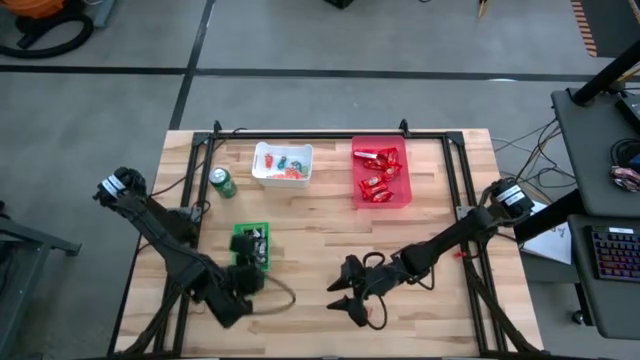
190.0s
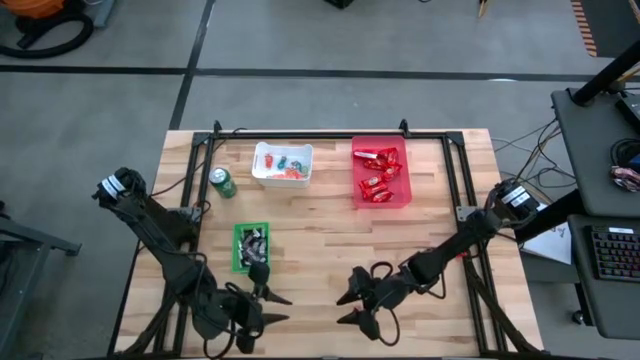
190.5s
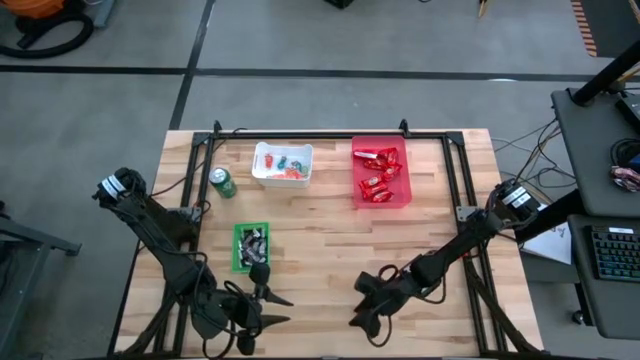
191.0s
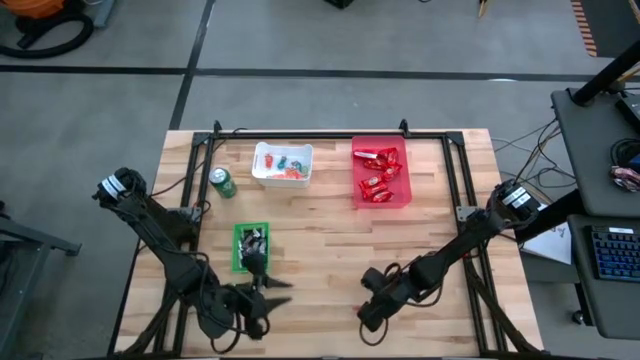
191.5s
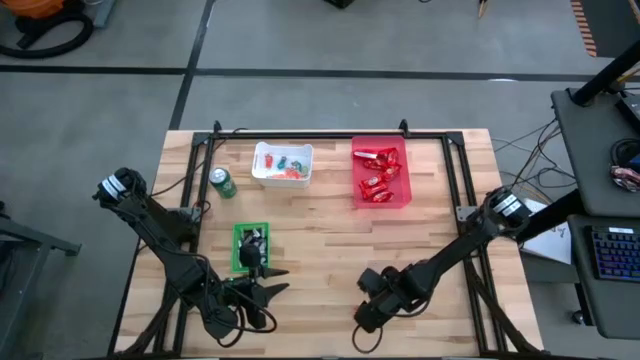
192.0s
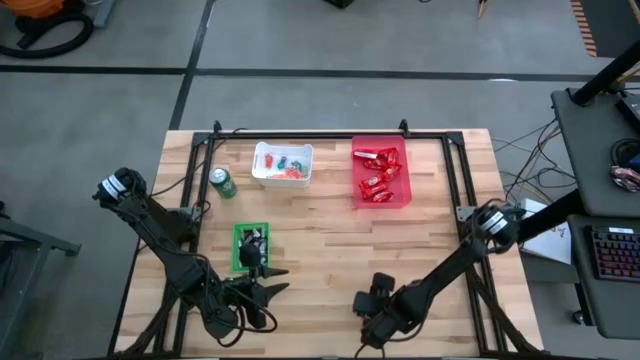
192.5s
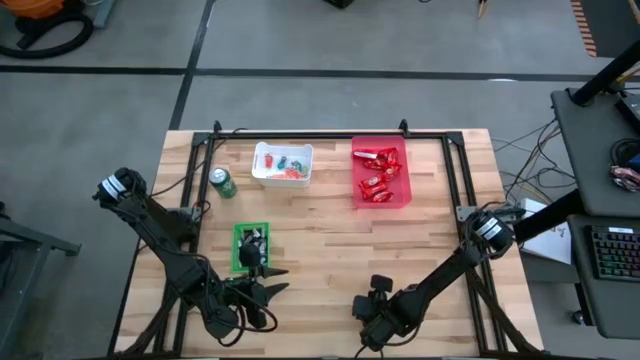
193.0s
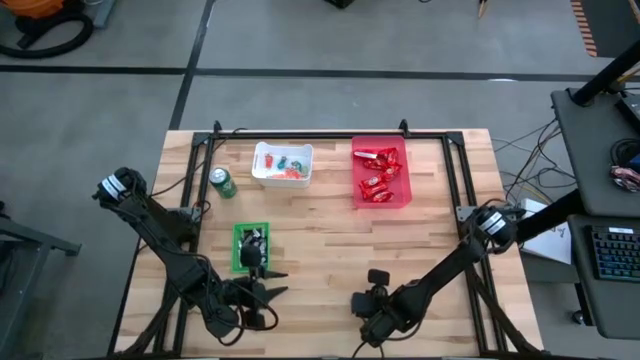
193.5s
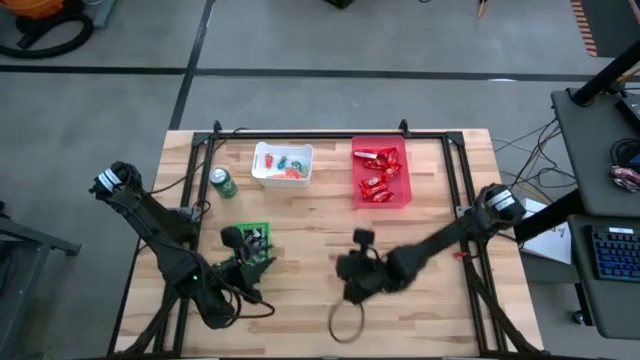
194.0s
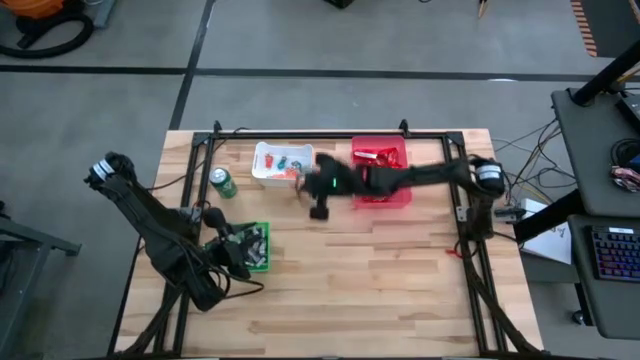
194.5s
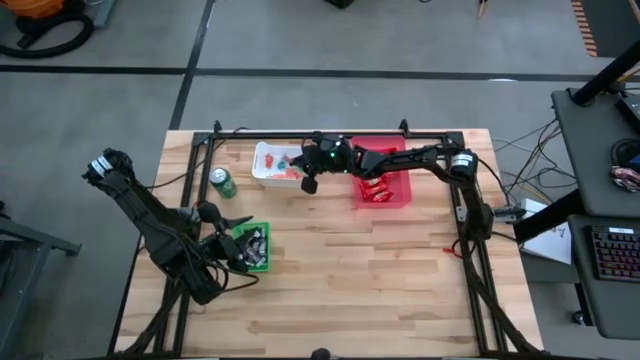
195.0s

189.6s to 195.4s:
Task: Organize candy in baskets
Put the orange gummy into the white bin

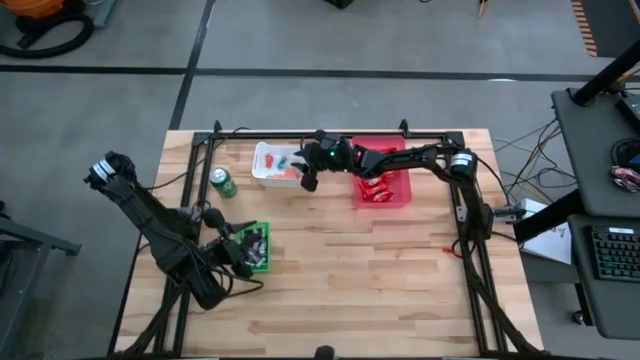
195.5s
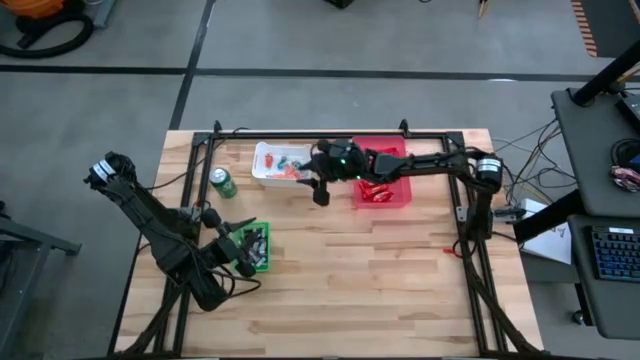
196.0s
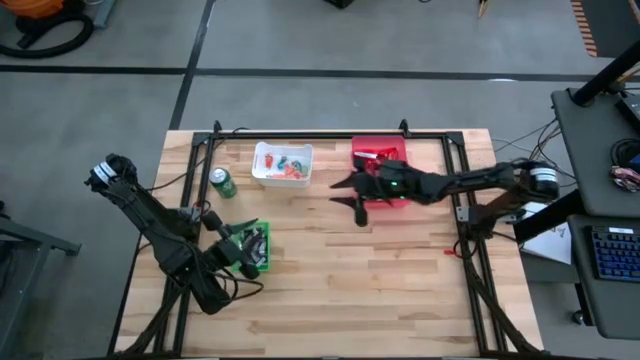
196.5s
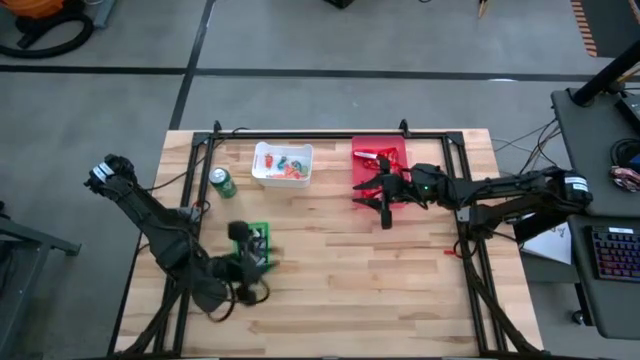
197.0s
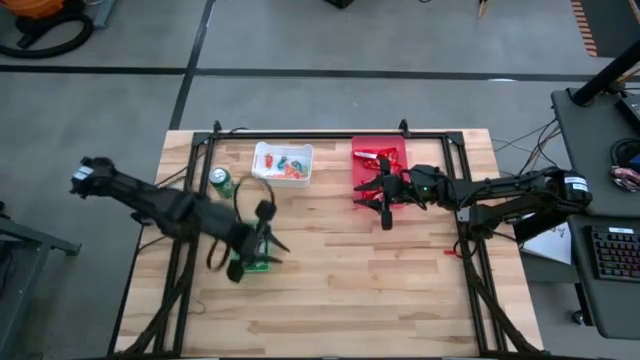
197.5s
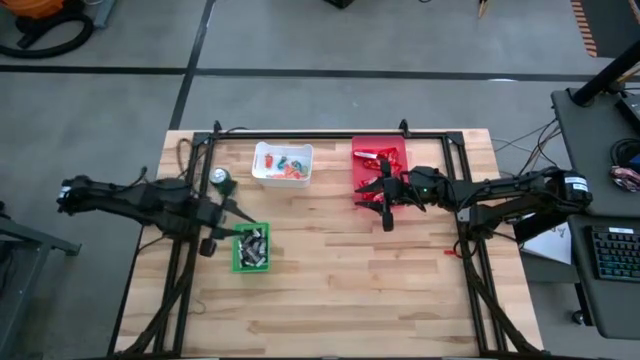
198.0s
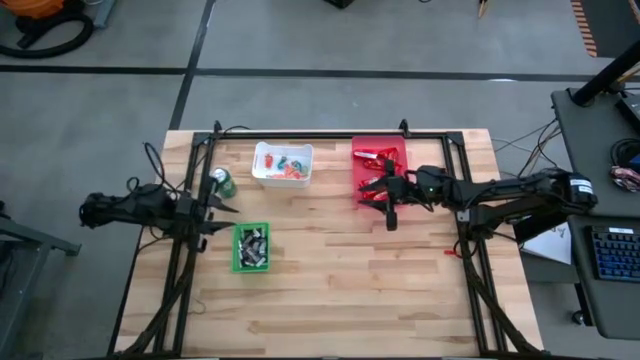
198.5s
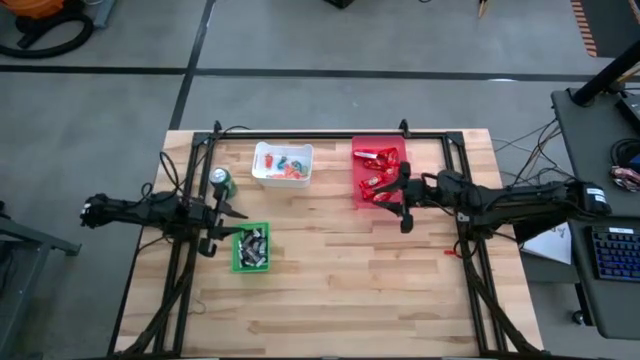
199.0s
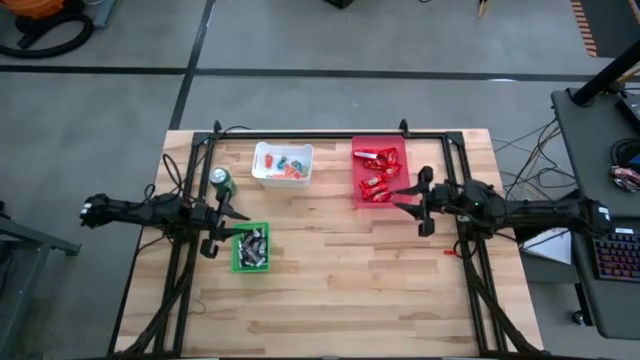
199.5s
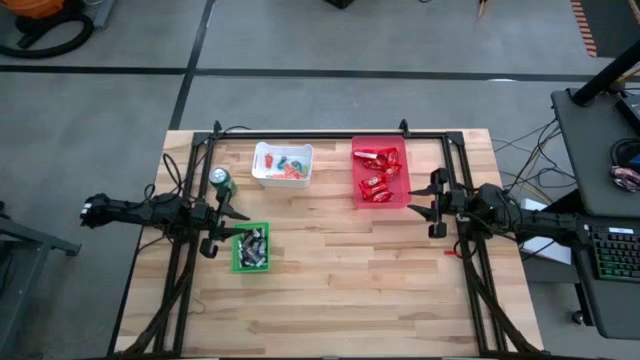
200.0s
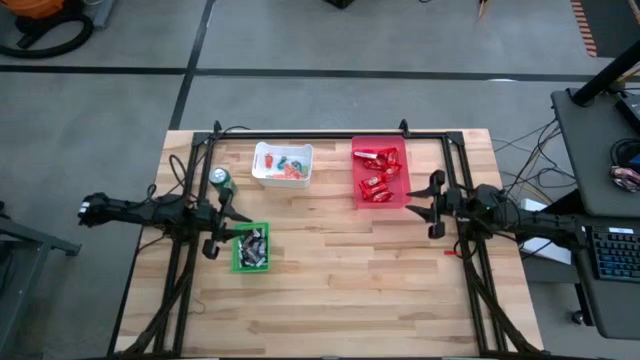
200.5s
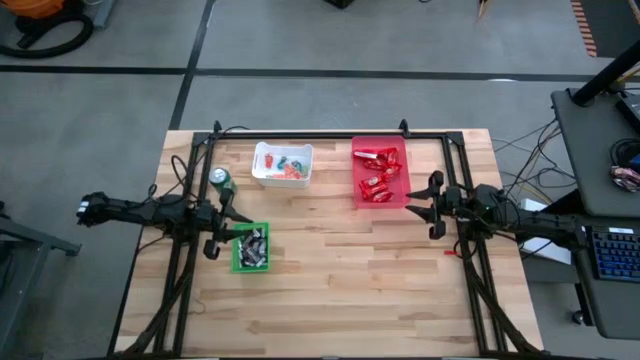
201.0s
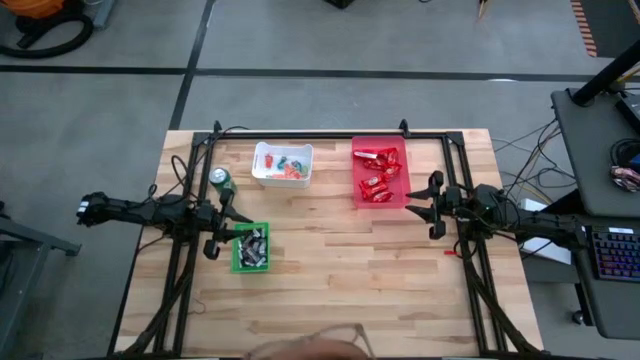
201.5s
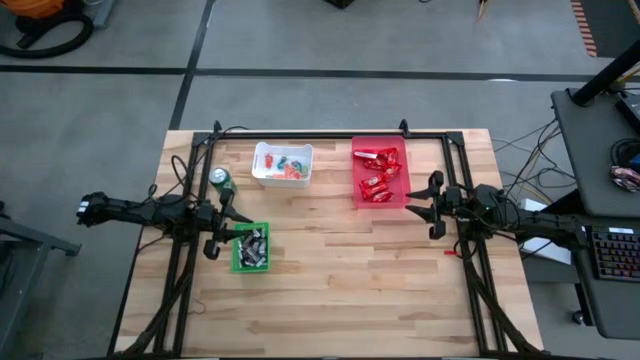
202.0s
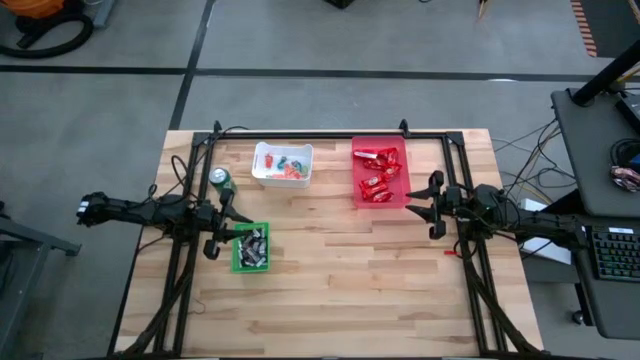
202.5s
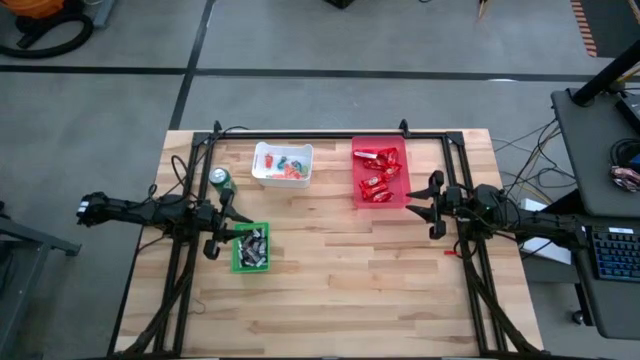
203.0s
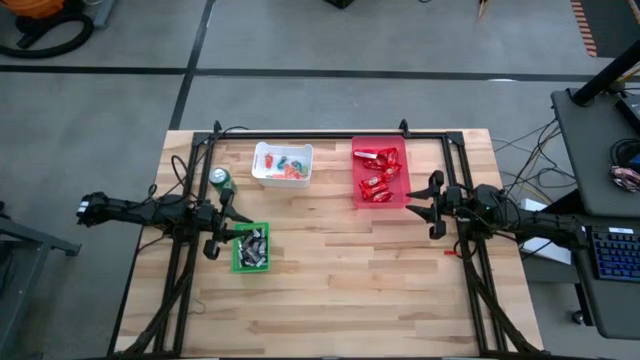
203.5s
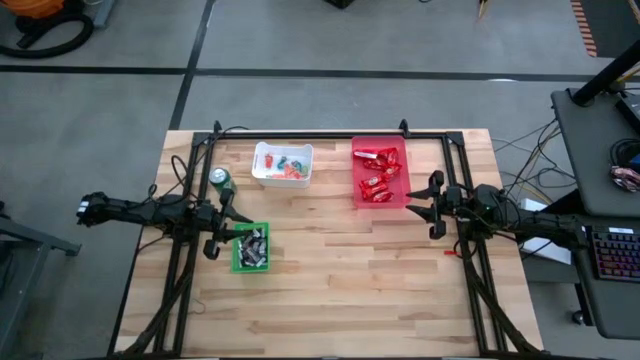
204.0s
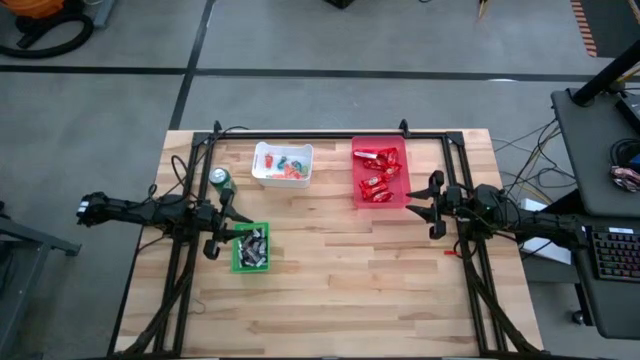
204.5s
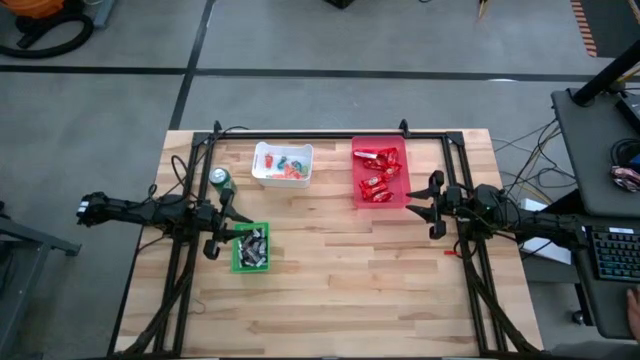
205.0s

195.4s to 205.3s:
Return to Home Position

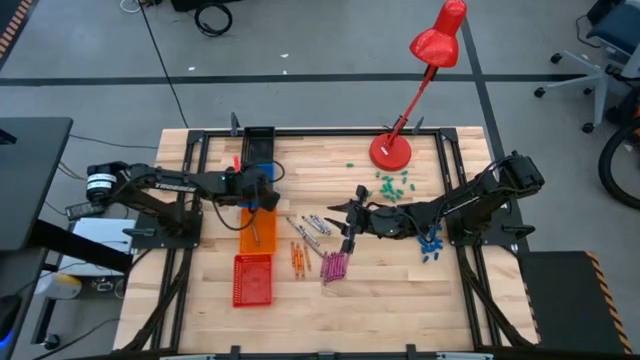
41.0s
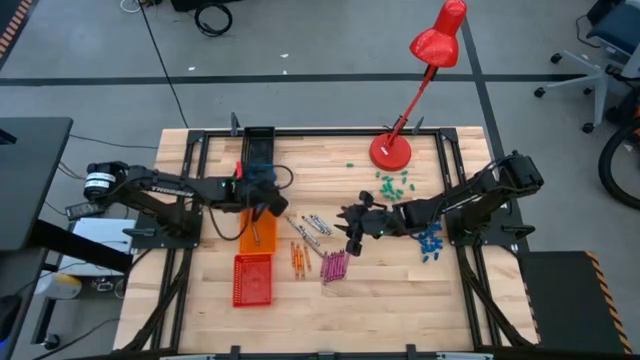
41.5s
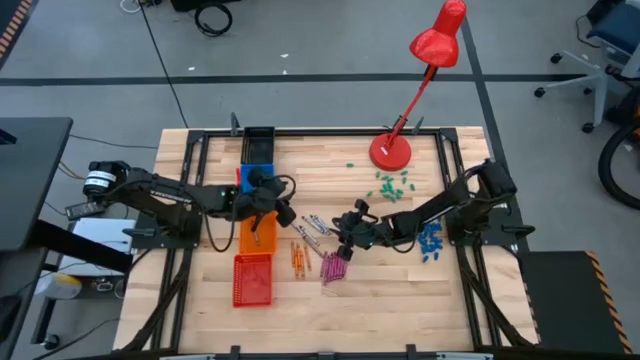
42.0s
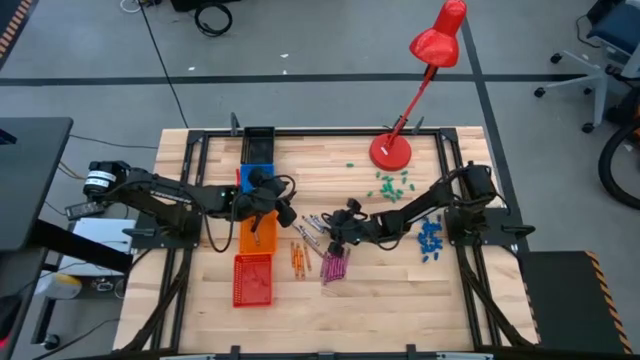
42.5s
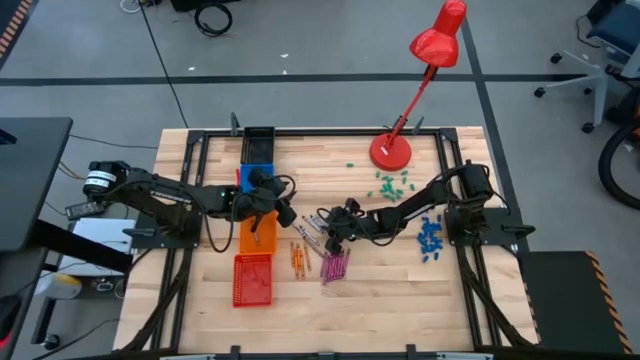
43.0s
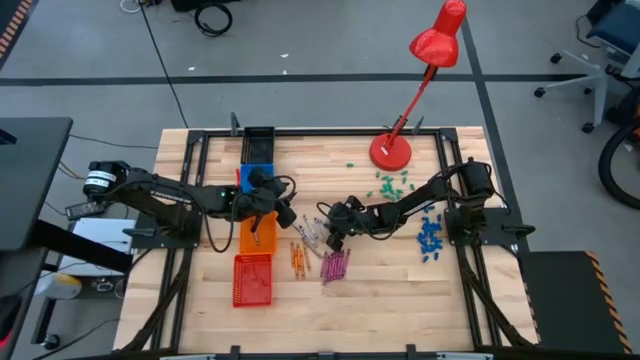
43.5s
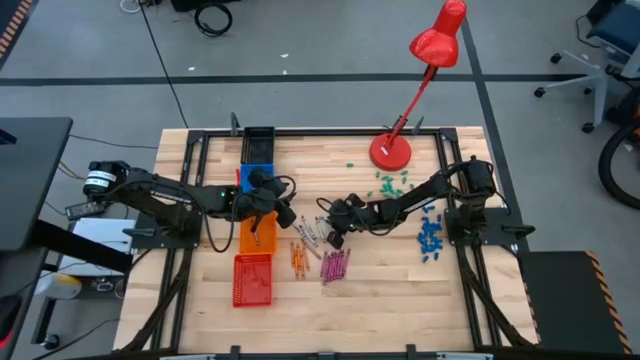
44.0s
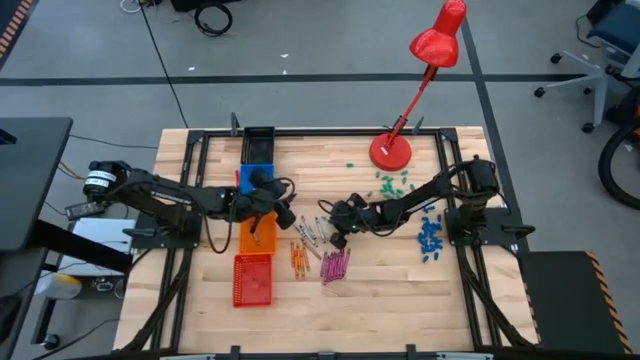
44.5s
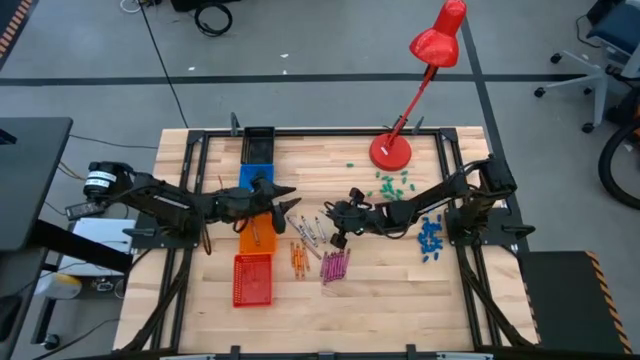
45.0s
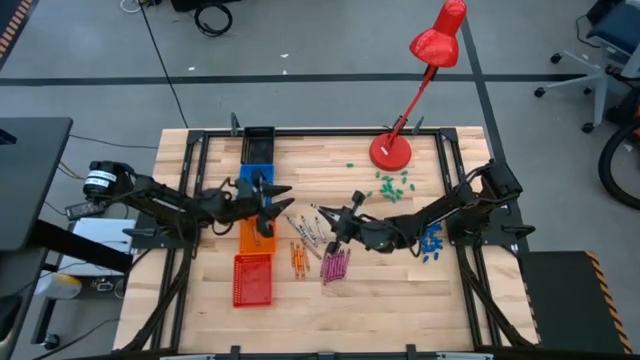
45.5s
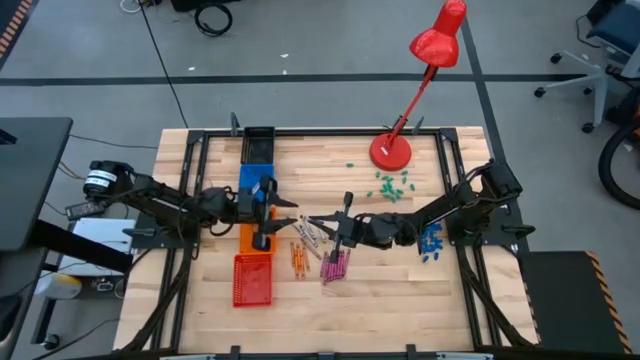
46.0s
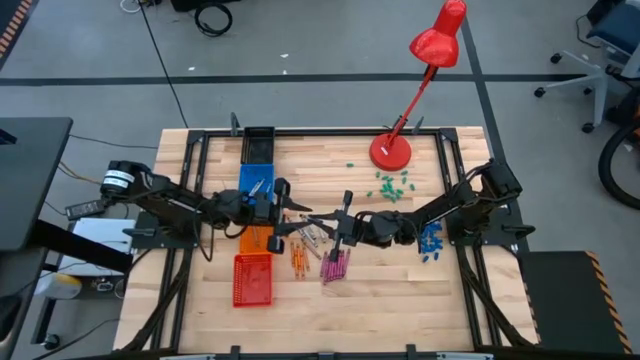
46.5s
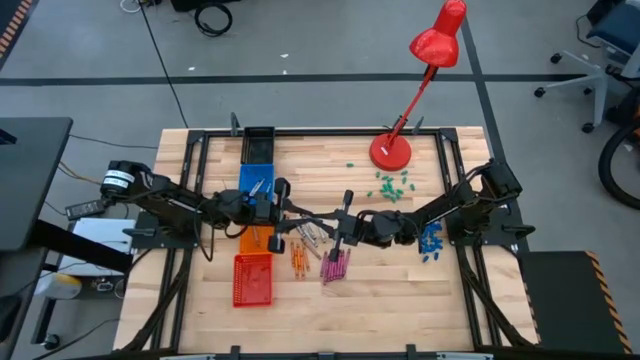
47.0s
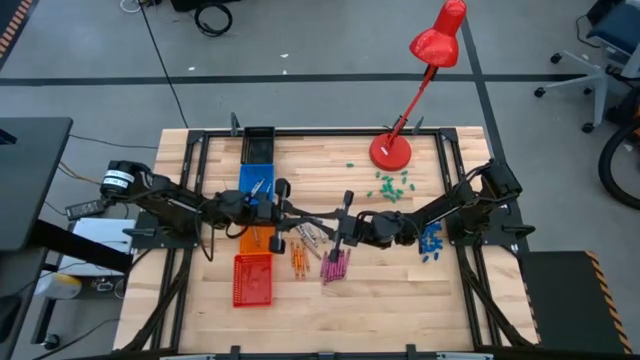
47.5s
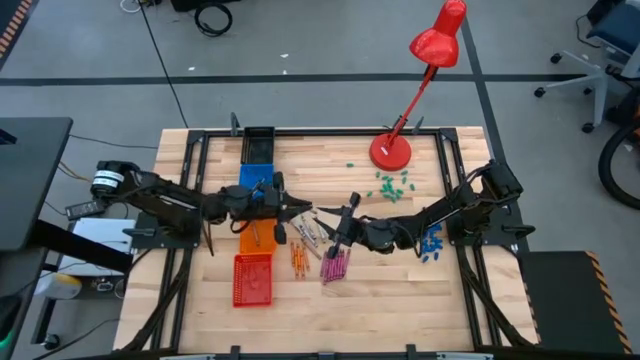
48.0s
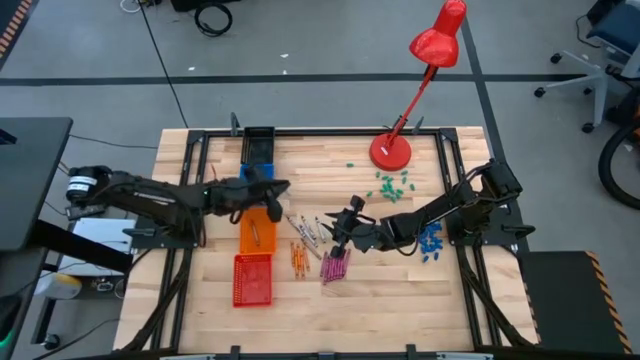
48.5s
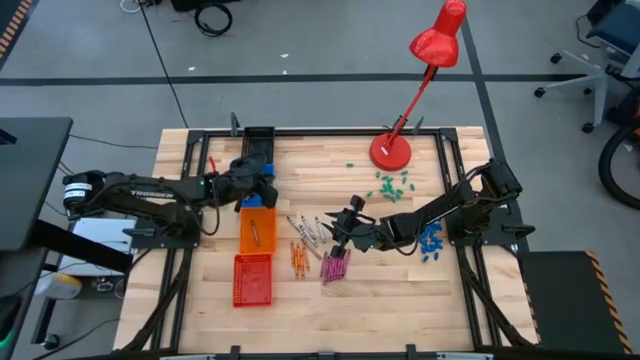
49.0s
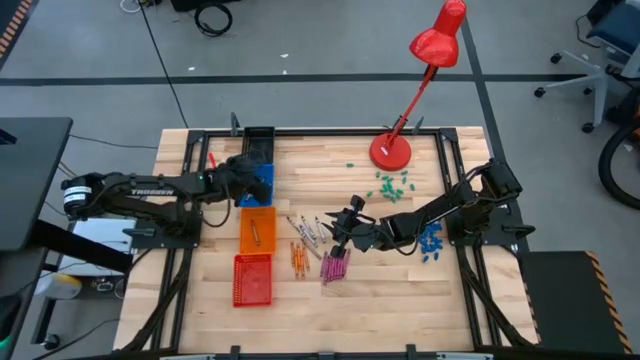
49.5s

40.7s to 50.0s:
Task: Sort crayons
Put the black crayon into the blue bin
